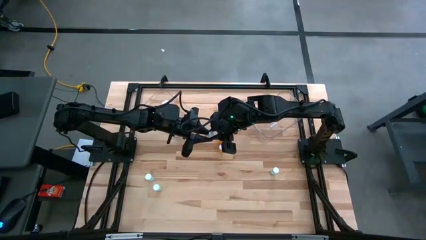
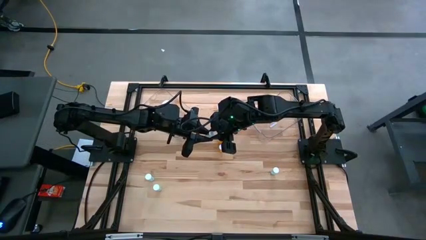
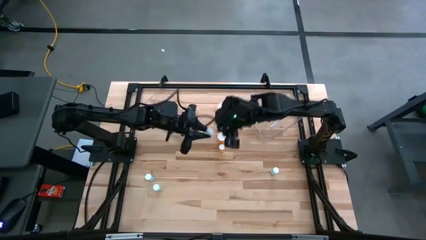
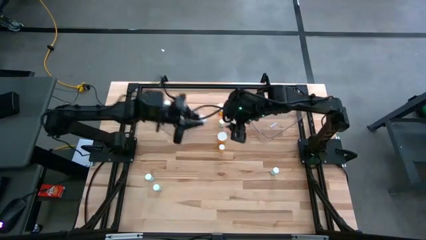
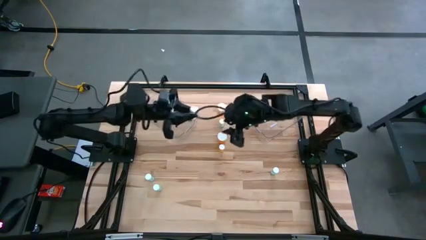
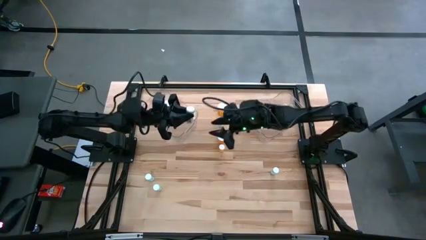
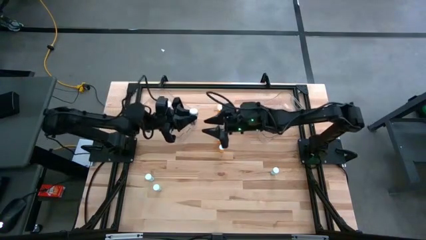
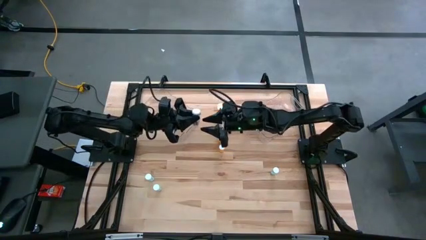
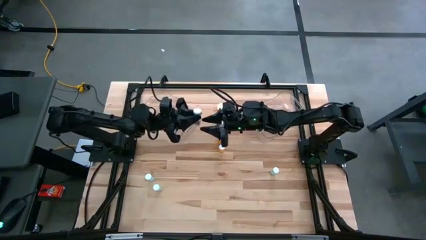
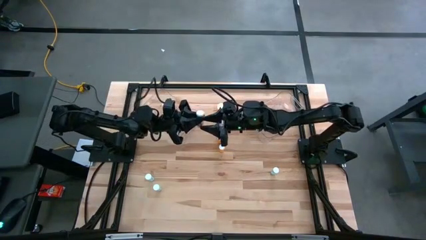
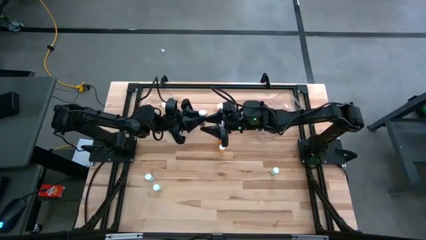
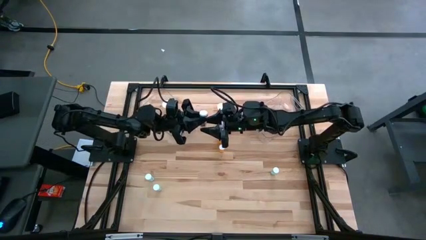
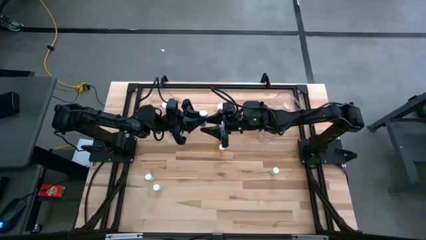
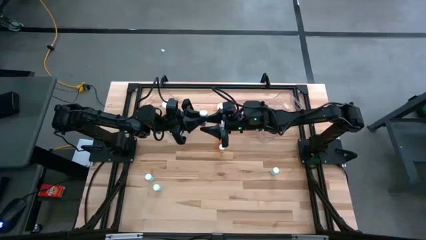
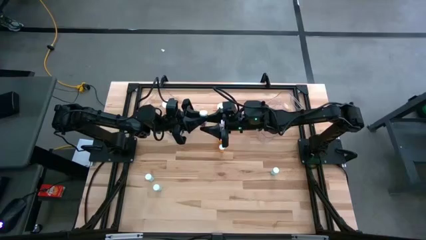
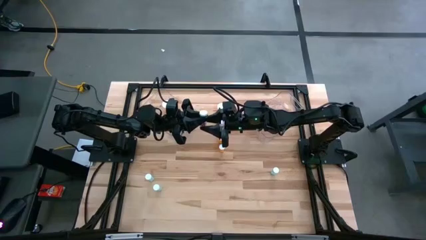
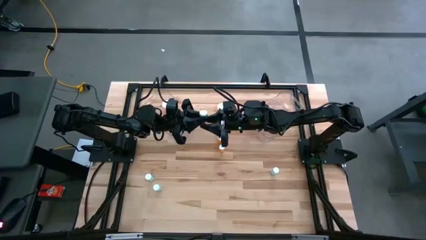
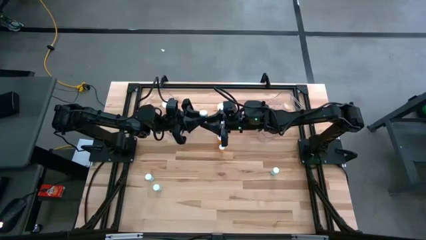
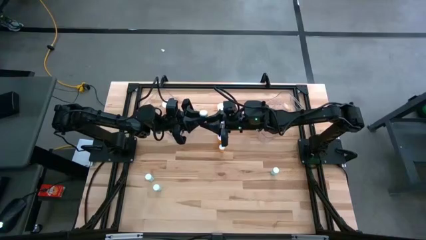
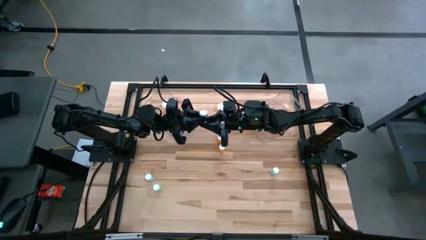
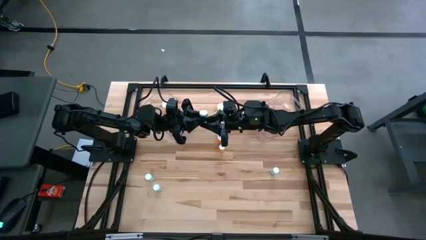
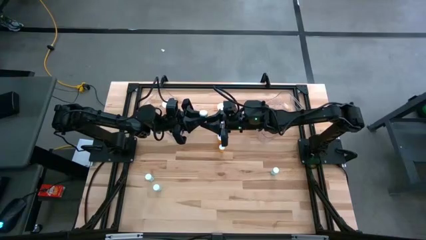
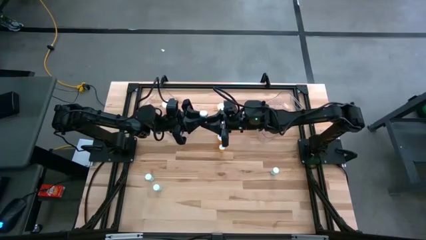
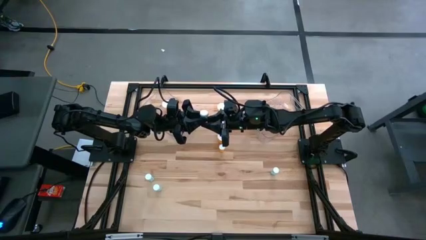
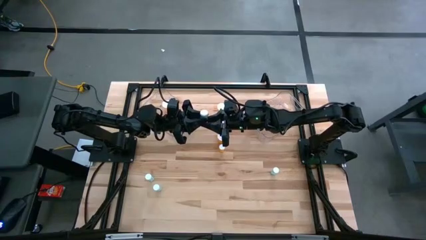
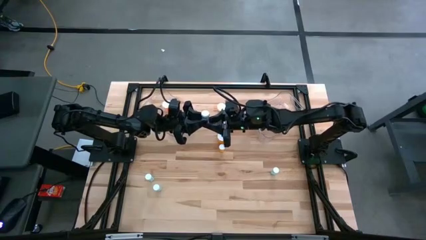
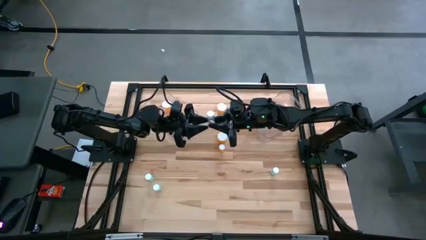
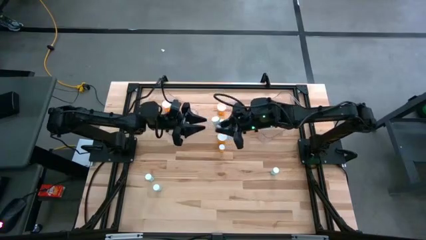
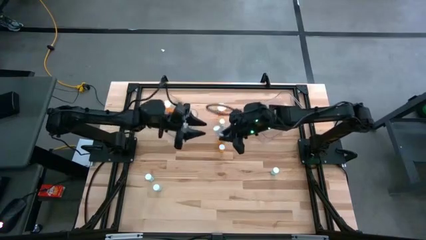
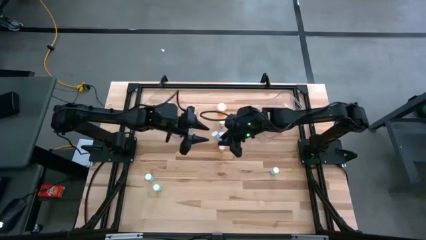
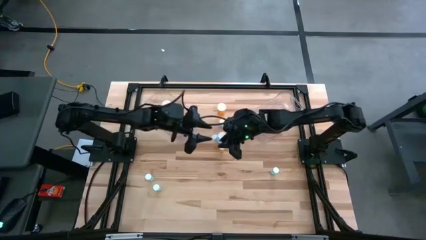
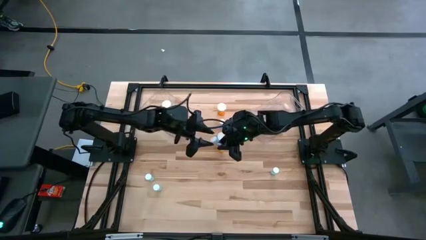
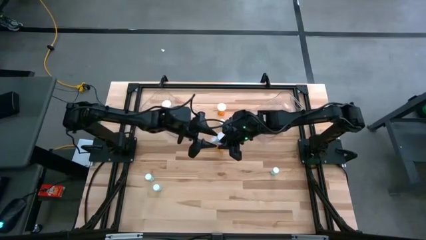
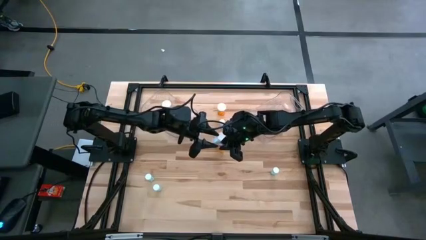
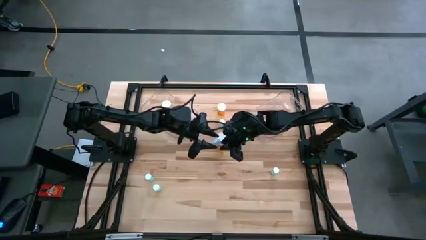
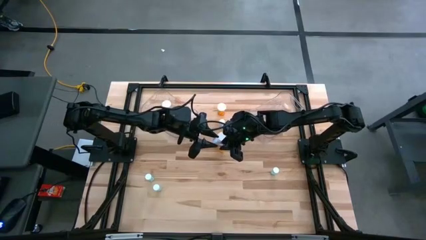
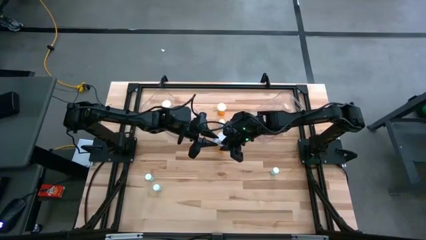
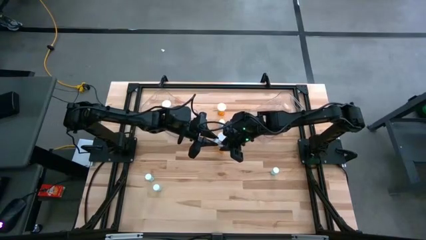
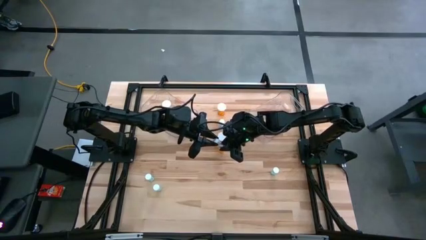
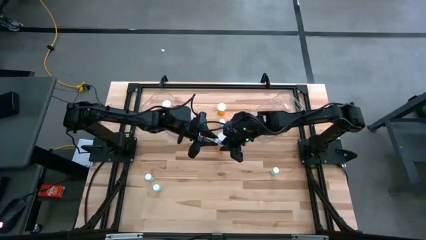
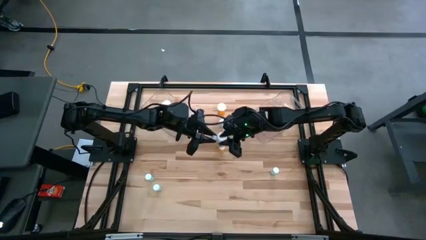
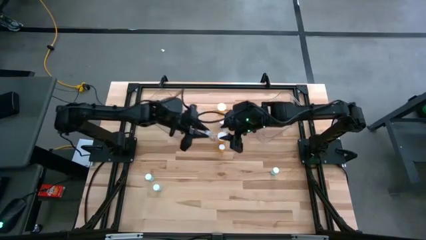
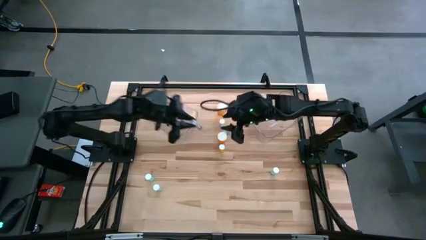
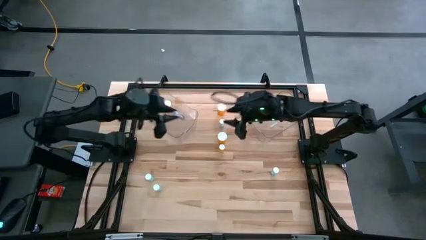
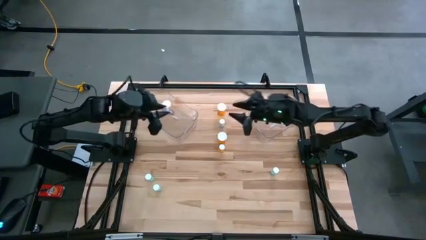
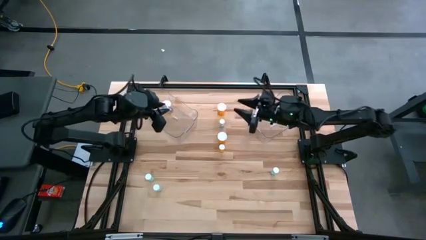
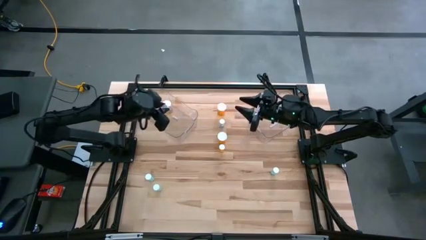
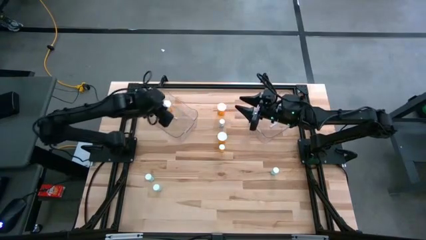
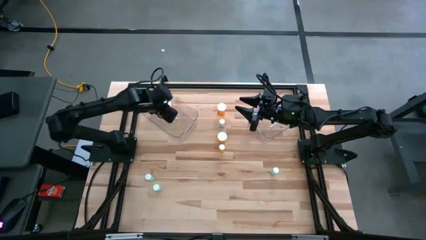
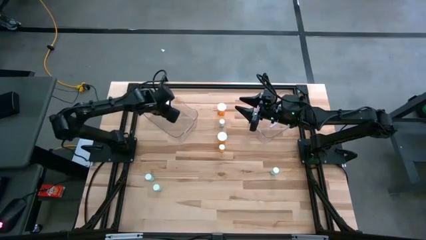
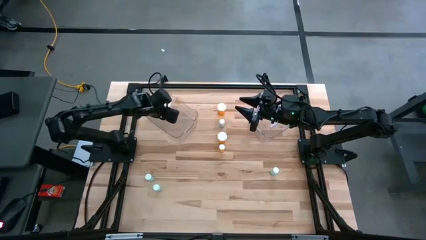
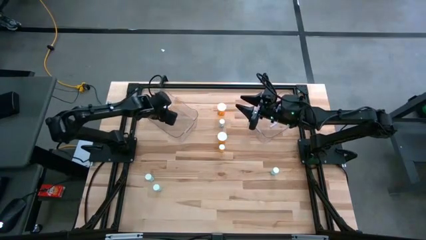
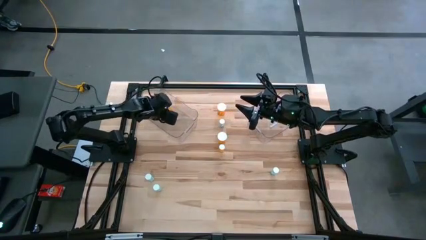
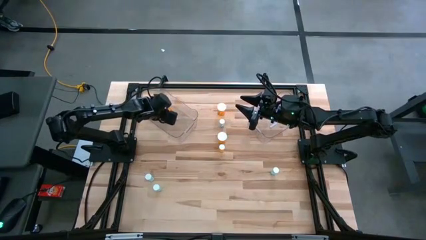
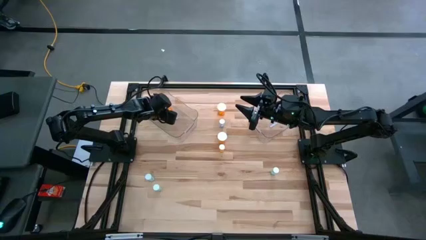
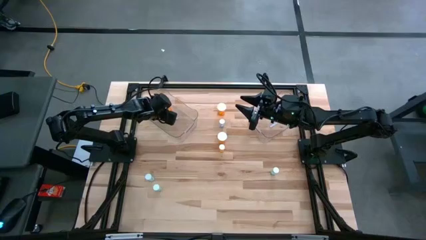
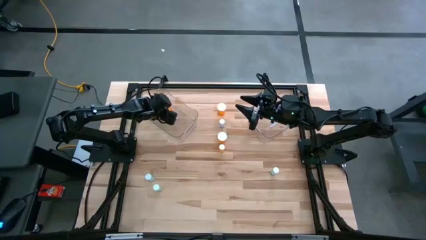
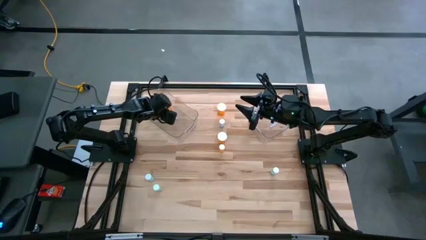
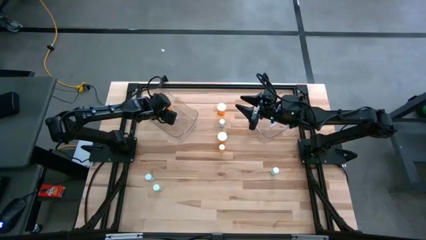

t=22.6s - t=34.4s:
Task: Pick and place medicine bottles into bin by pill shape (circle, oval)
Put the bottom green capsule bottle into the left transparent bin

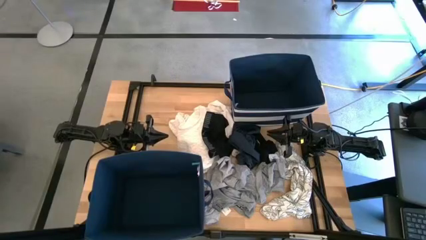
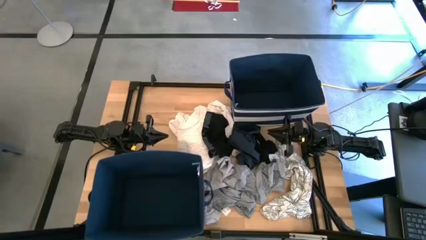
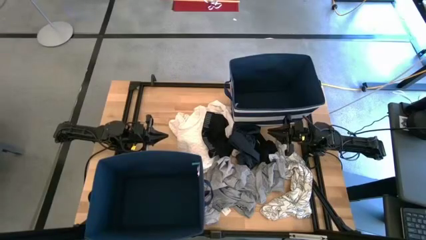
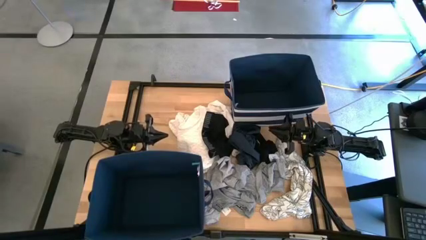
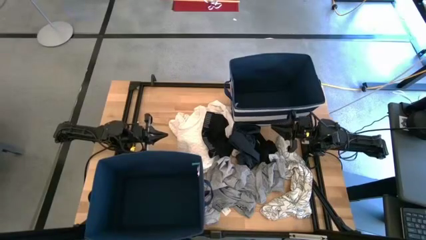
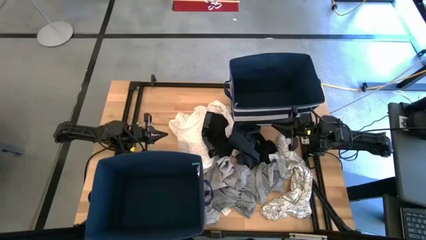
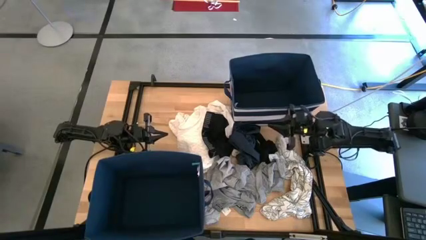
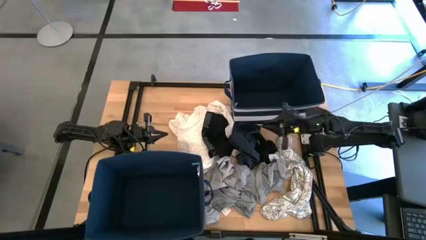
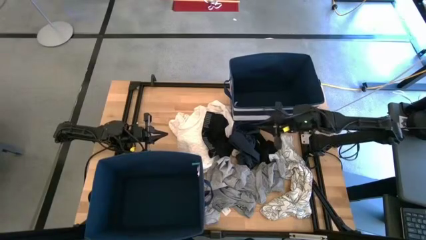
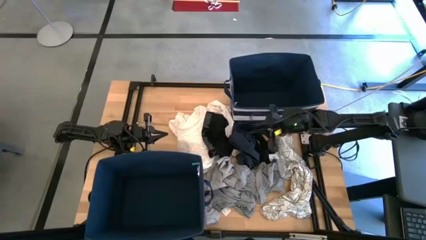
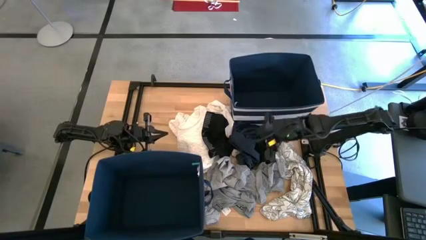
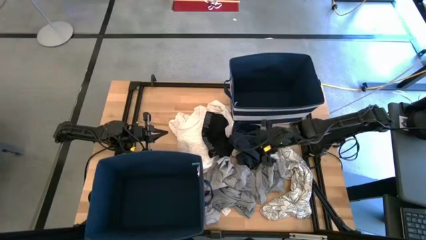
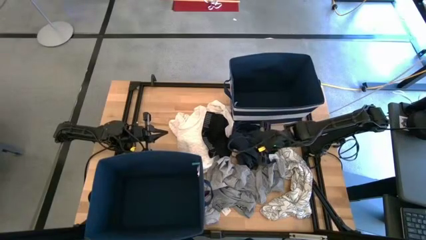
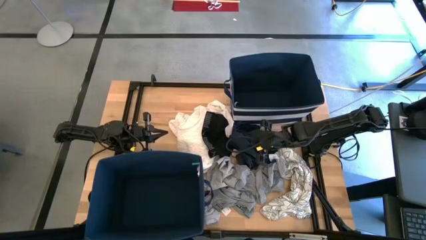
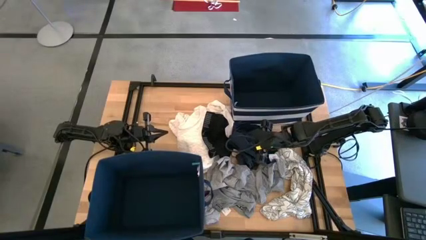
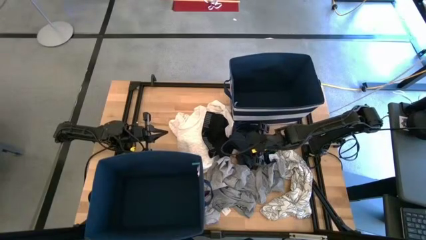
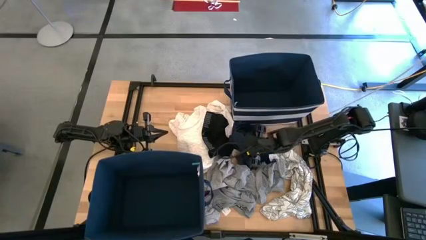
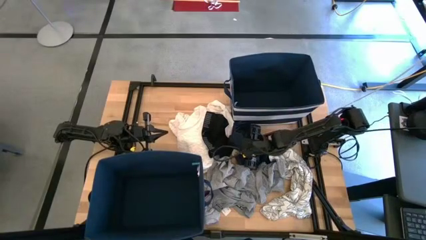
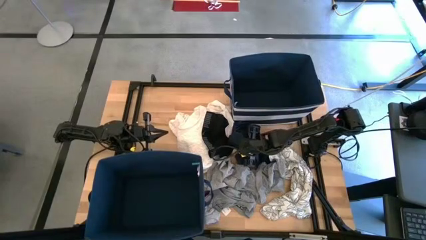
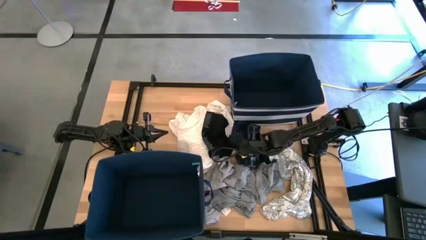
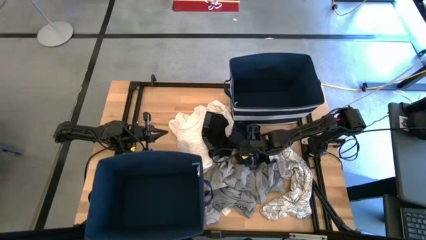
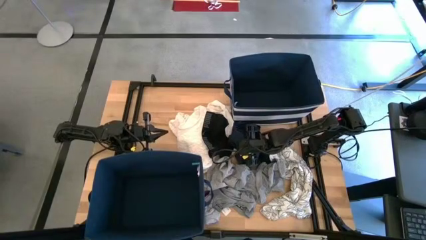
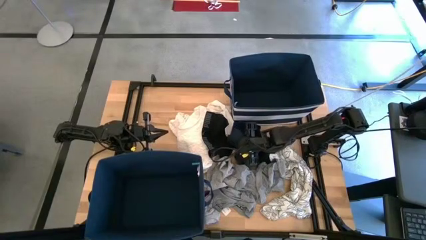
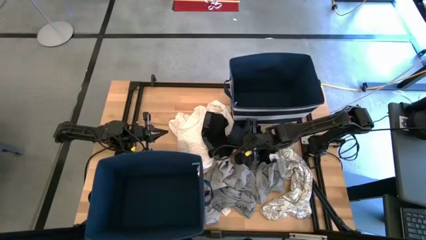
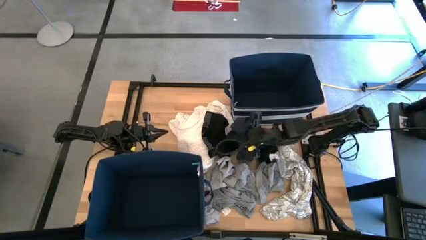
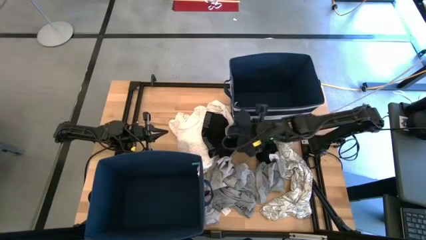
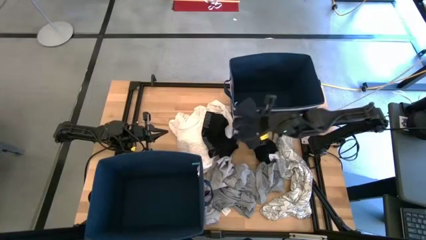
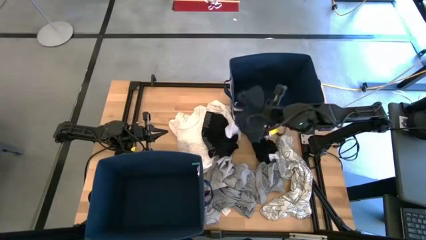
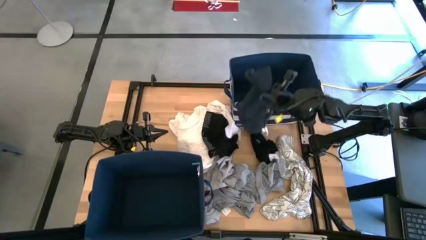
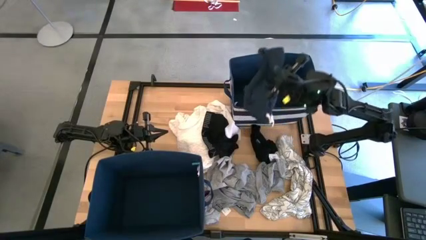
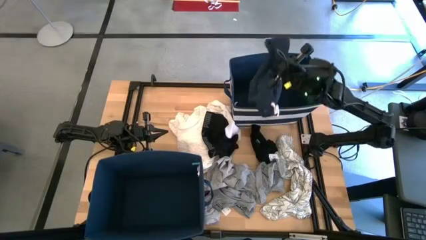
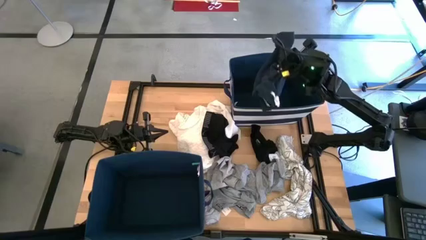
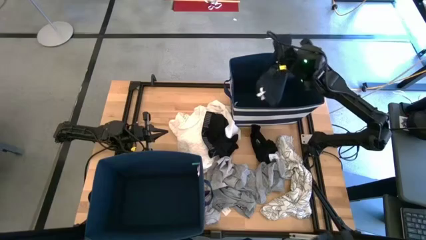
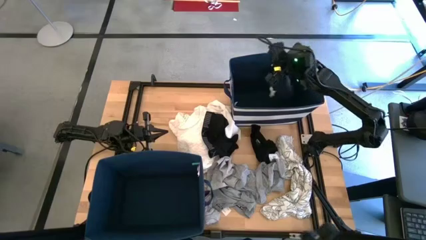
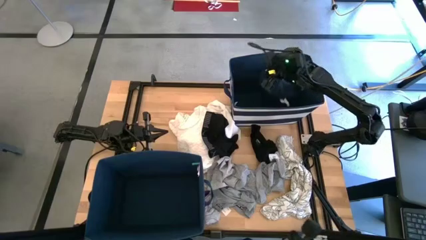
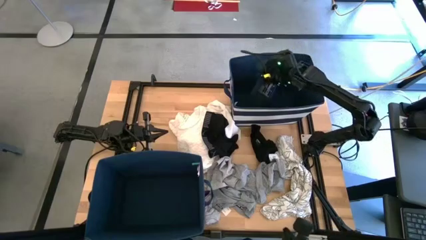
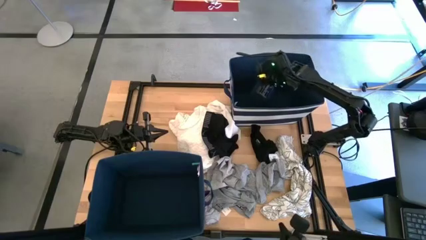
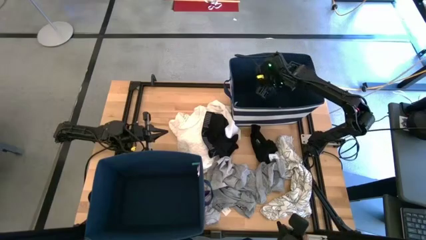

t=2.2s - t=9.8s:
Task: Sort clothes
Put the blue shirt into the top right laundry bin
